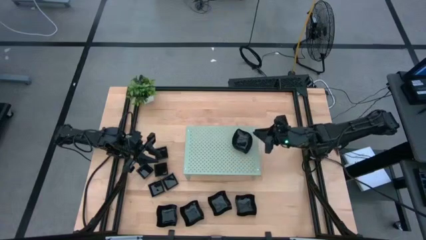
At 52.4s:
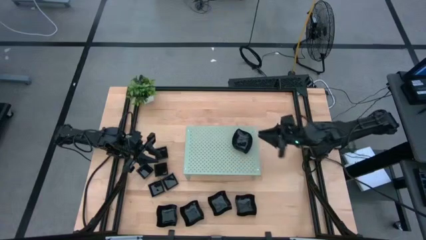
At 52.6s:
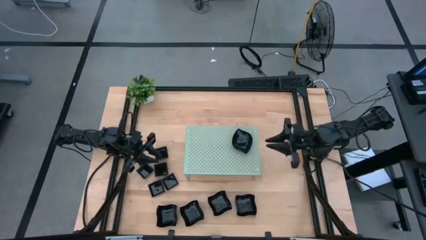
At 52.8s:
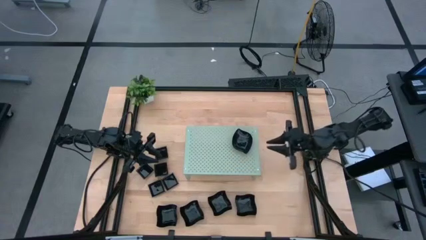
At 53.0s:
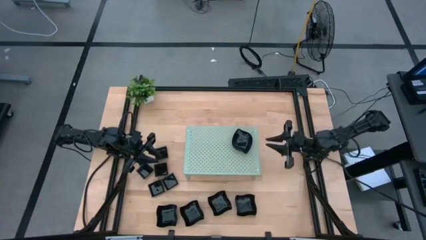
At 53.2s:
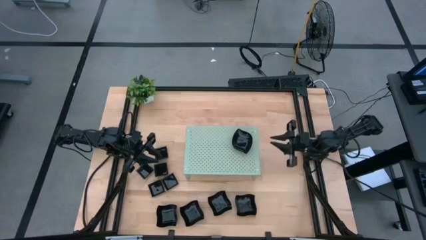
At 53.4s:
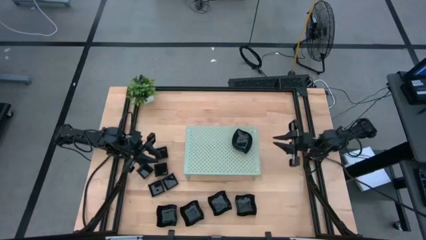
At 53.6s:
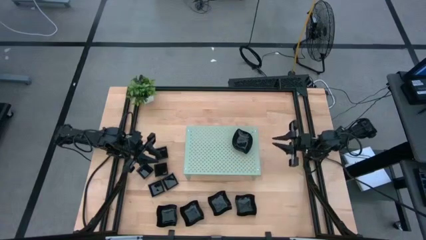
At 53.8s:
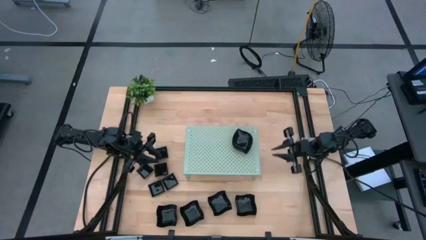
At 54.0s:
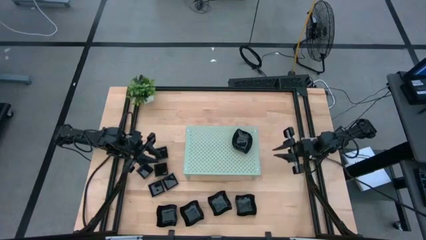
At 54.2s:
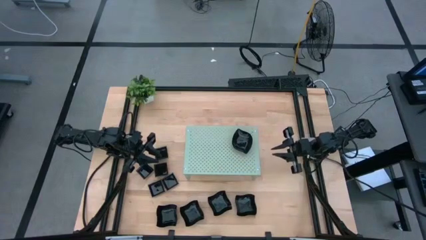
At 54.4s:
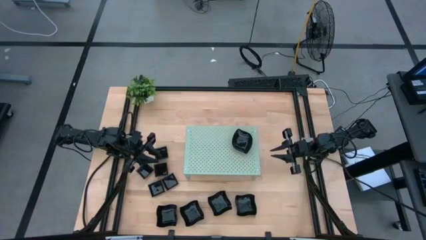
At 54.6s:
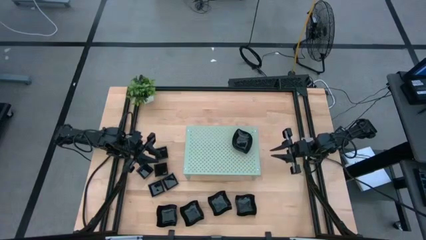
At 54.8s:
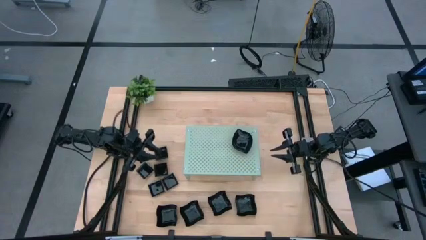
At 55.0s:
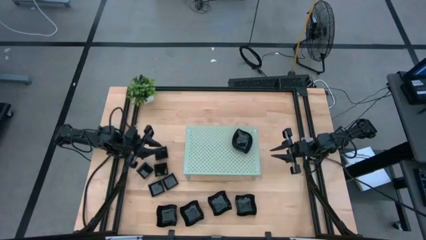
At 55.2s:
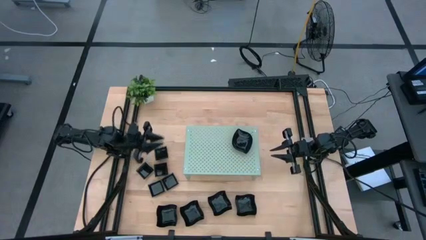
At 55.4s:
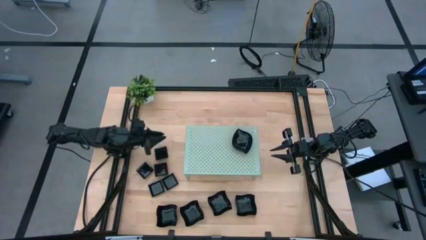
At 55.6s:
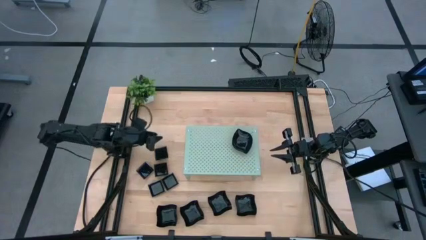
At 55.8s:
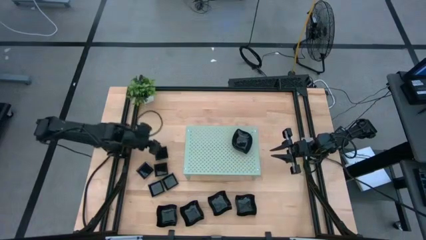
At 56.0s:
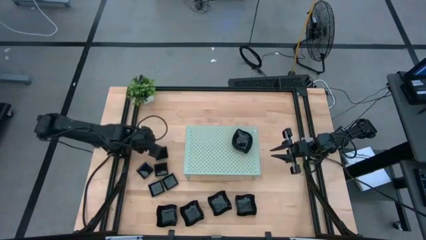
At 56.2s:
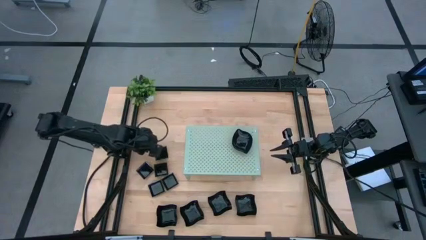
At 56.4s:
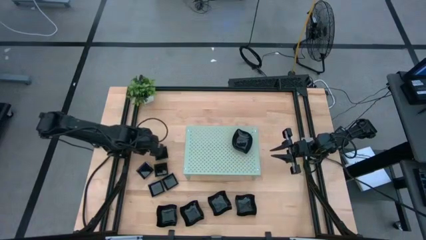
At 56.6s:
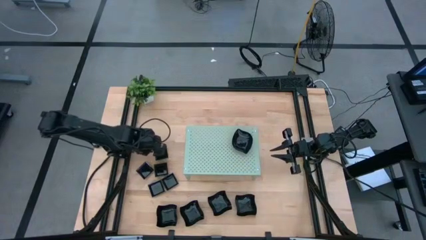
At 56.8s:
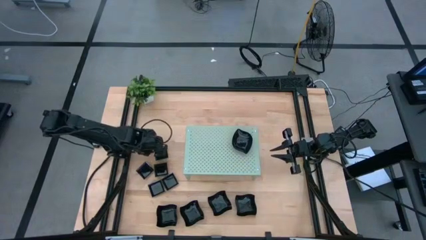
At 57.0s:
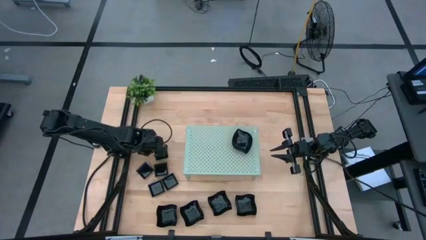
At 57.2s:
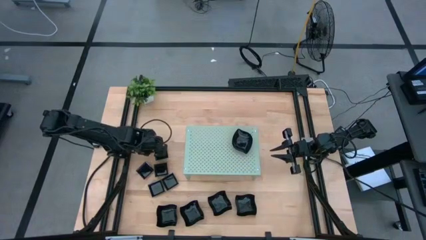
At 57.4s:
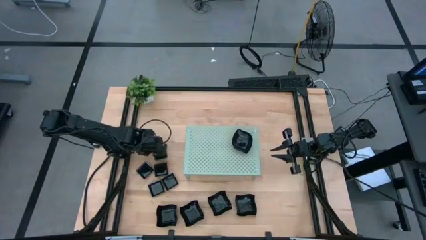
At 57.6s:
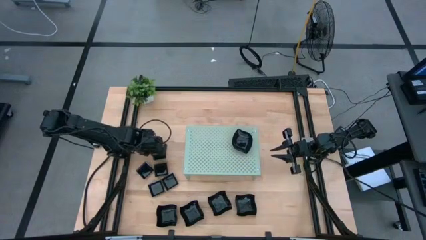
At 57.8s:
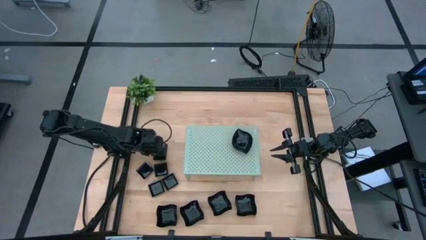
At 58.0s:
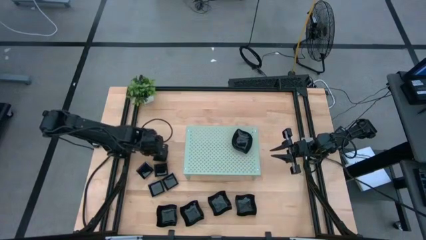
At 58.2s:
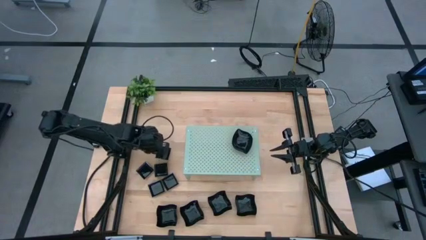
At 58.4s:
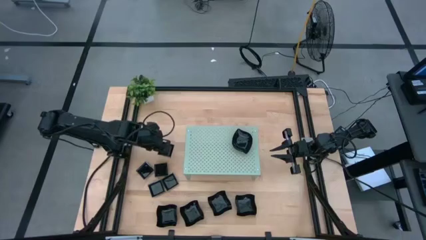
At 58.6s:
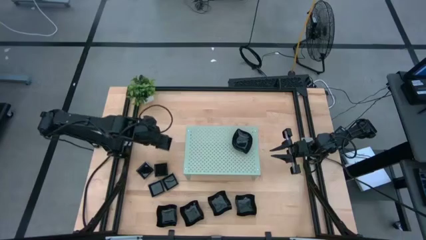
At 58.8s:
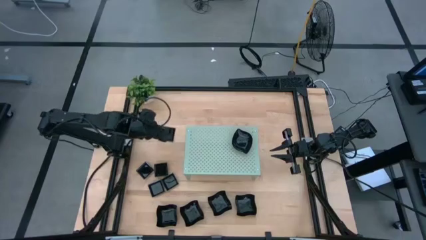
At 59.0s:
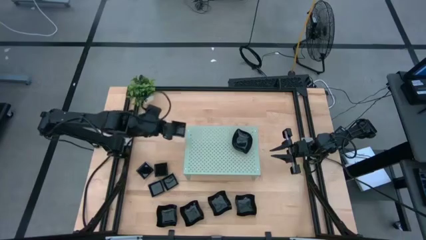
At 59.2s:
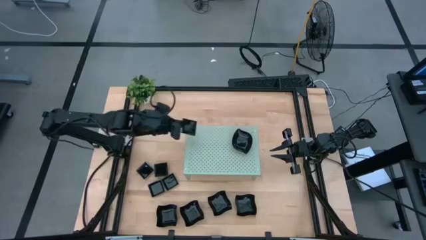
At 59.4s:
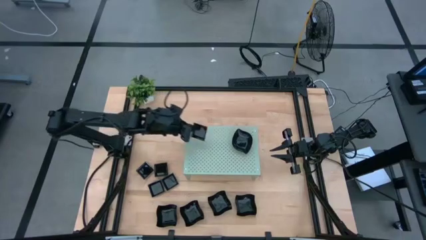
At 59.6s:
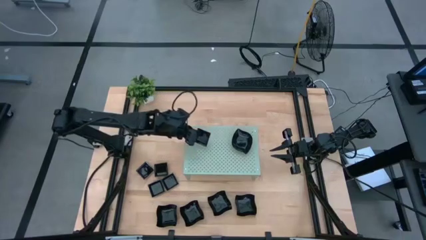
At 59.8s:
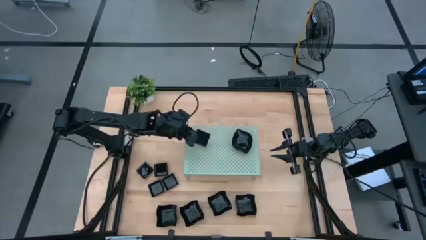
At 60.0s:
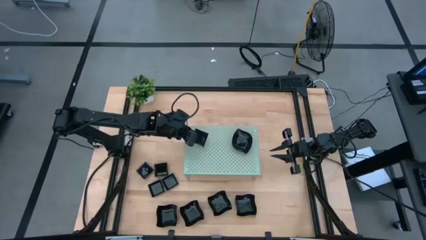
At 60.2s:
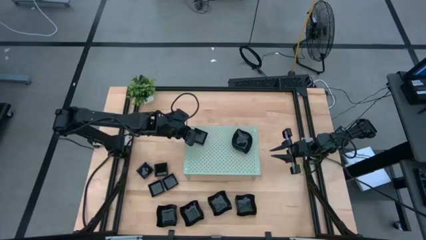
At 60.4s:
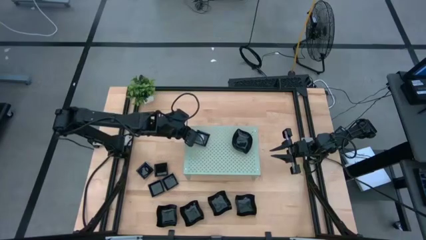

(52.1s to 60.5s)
Task: Pick & Place Mini shaped plates
Put the square plate on the shelf

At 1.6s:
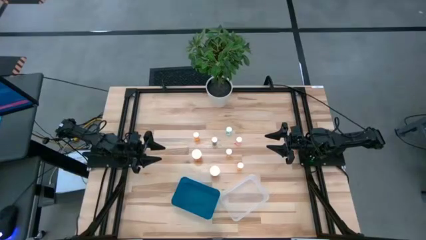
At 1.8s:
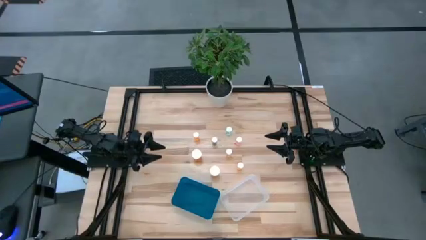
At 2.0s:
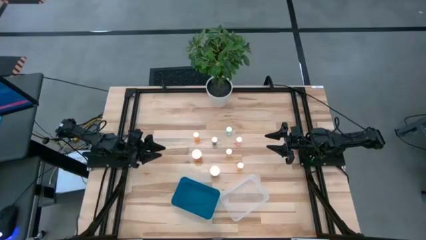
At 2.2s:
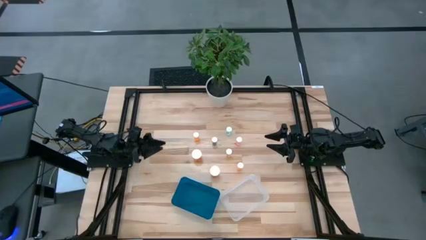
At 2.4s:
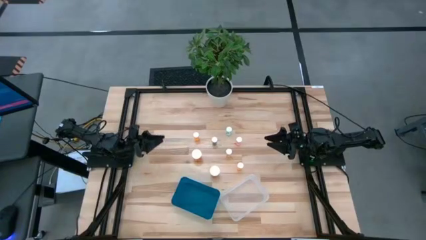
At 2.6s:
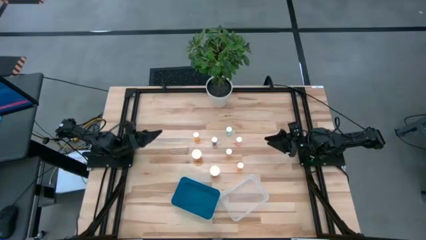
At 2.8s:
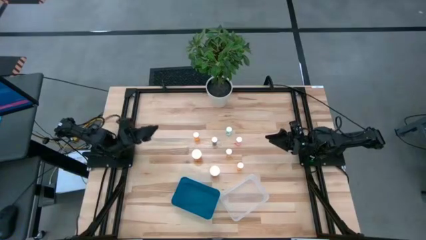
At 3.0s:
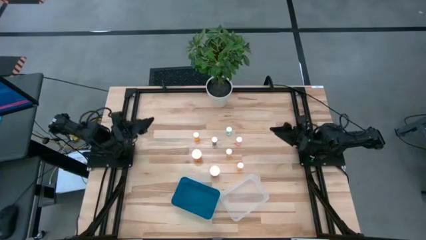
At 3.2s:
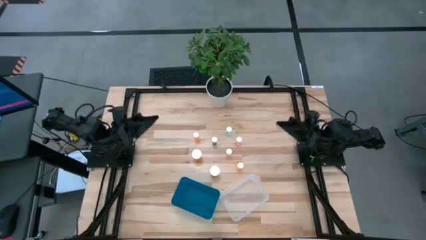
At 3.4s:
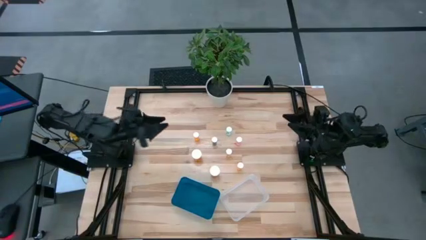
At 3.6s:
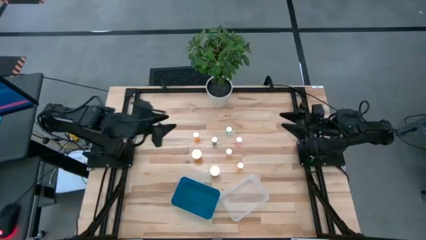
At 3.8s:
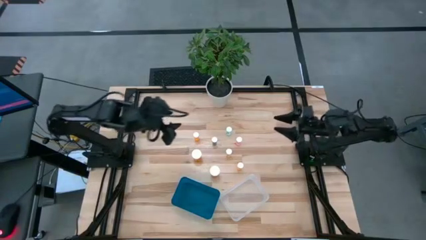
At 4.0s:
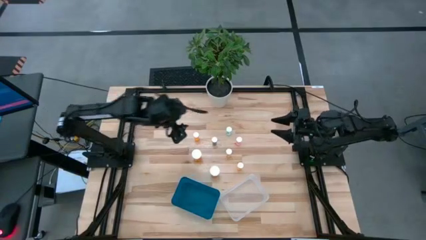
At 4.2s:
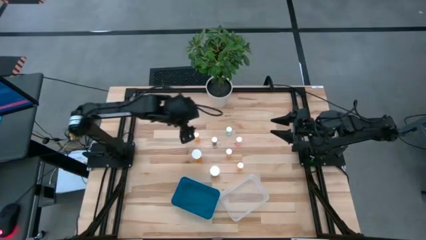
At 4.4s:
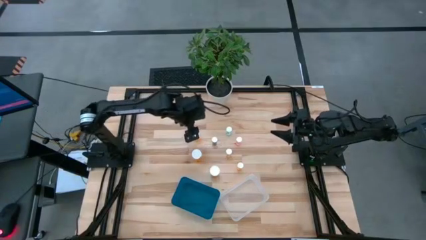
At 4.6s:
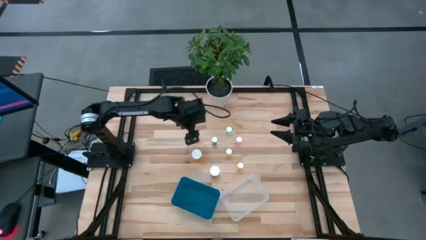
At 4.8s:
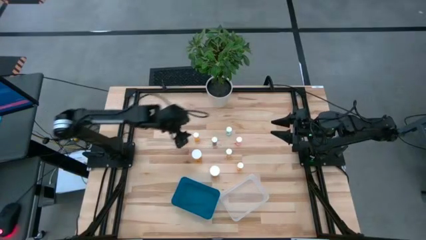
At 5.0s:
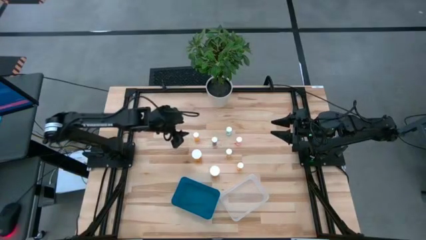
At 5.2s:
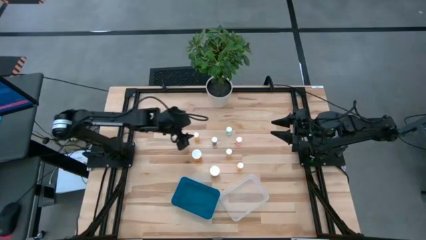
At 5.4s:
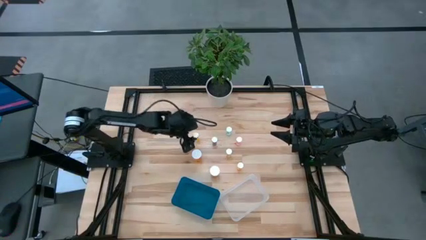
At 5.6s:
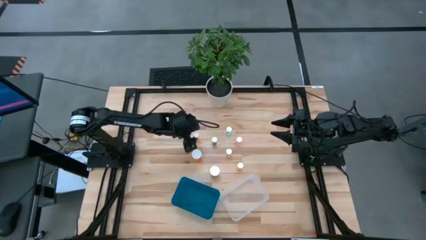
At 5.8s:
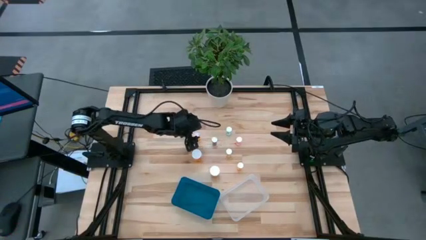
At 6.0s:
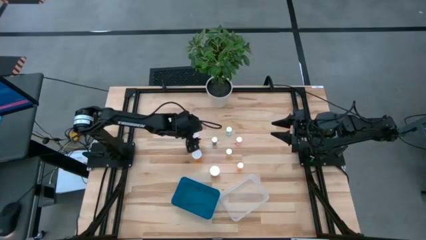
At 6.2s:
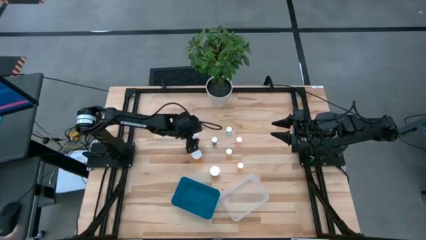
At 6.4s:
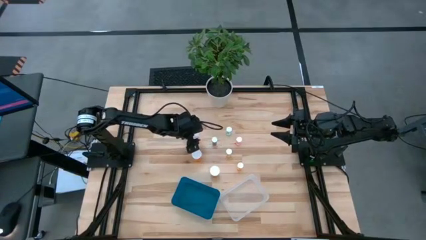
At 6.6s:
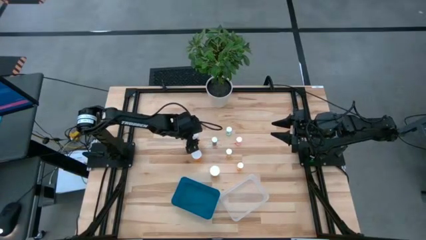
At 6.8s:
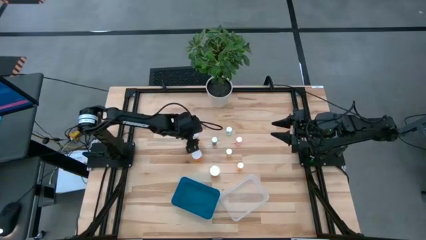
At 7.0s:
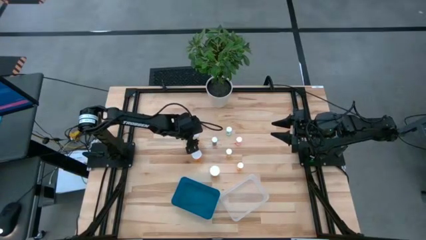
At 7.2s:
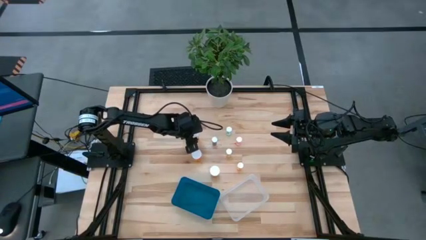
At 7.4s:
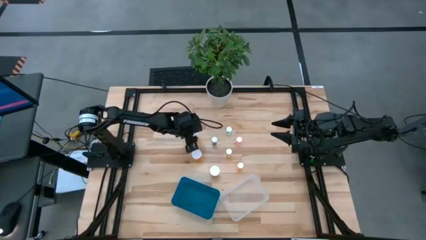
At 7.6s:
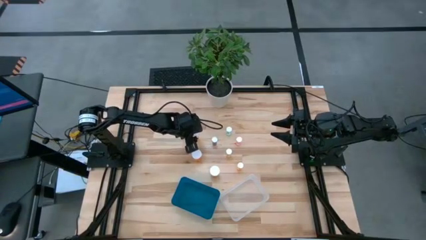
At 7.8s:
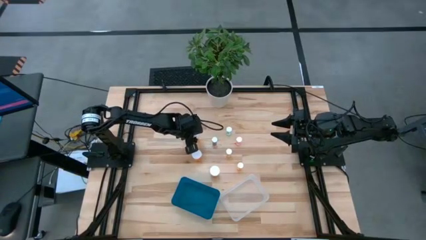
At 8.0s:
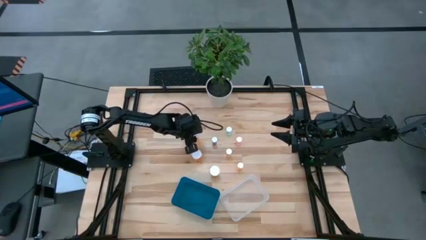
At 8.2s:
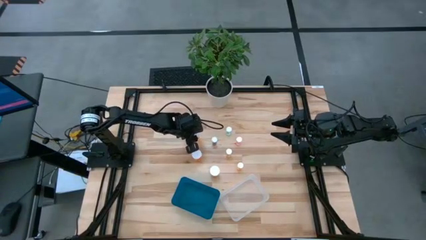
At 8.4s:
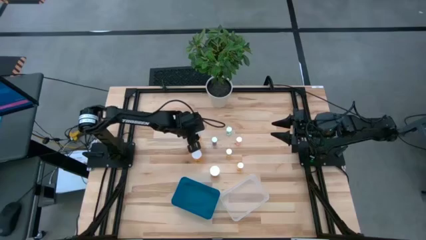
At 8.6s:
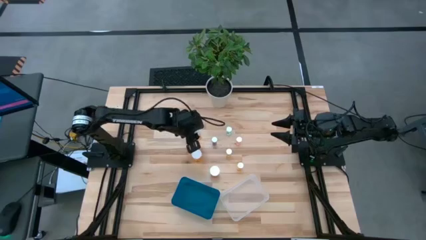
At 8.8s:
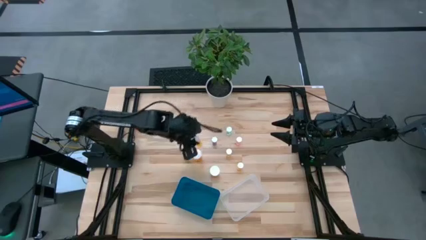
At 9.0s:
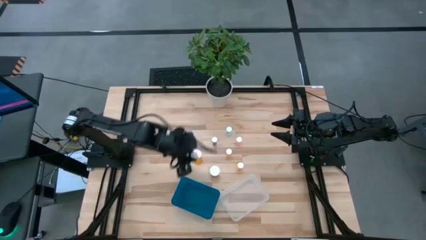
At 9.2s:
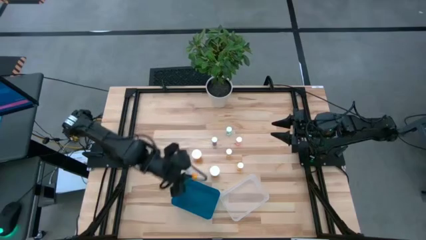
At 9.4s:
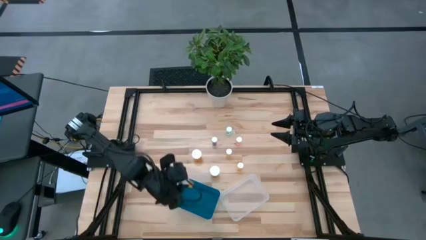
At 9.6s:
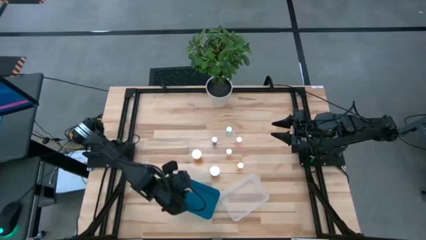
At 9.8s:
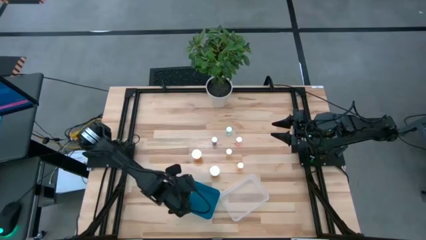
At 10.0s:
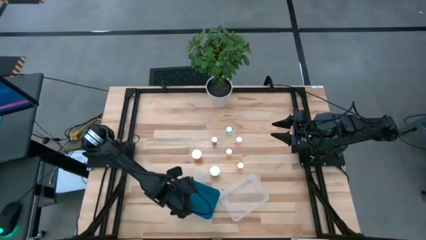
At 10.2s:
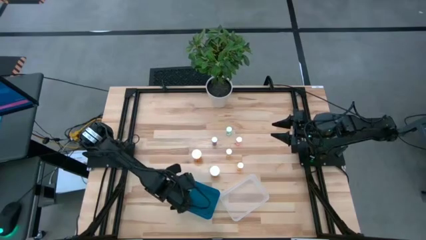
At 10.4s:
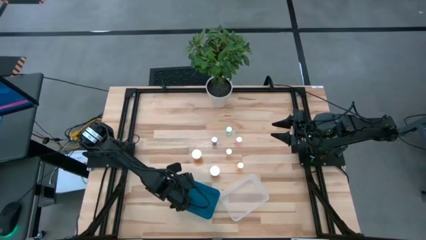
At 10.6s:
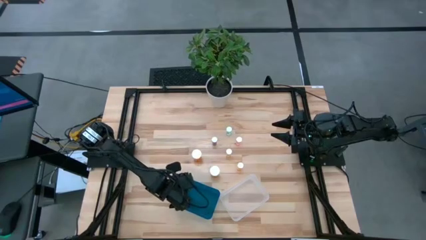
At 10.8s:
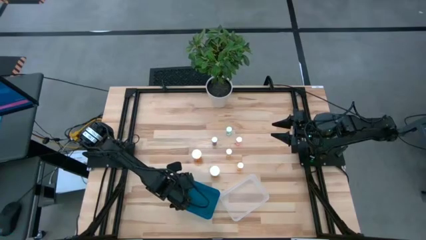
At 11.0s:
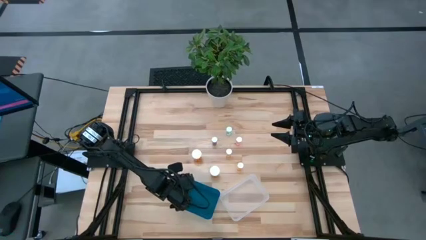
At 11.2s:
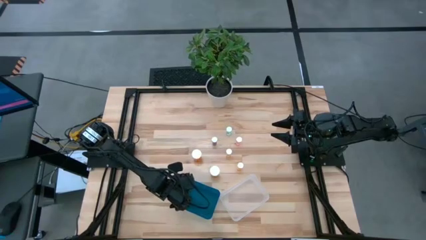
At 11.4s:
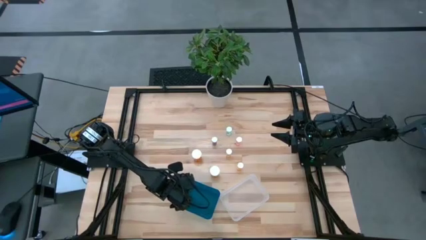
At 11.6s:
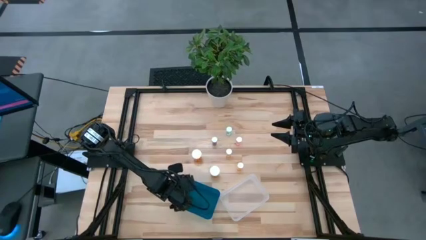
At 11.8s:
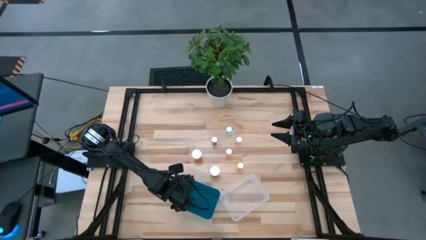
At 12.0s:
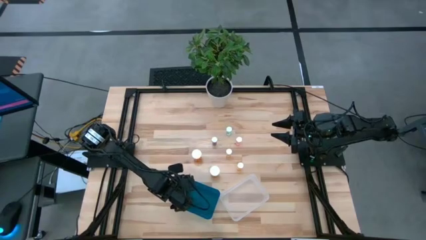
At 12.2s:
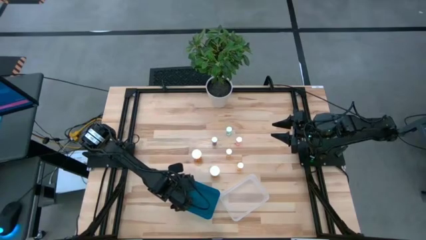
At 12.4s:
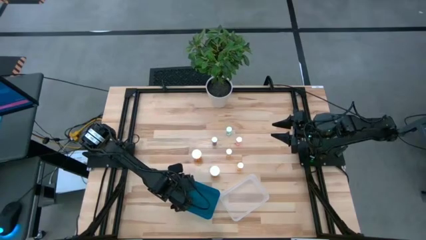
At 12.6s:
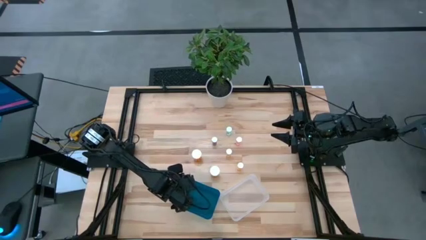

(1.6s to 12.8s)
Task: Pick and place medicine bottles into bin by pill shape (circle, oval)
Put the small orange small medicine bottle into the blue bin
